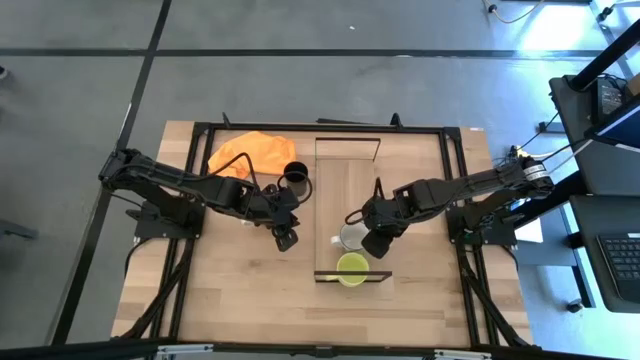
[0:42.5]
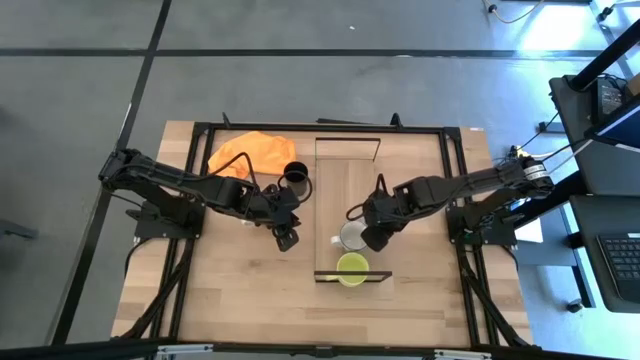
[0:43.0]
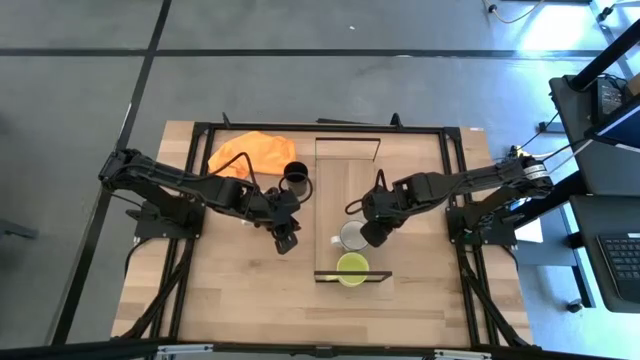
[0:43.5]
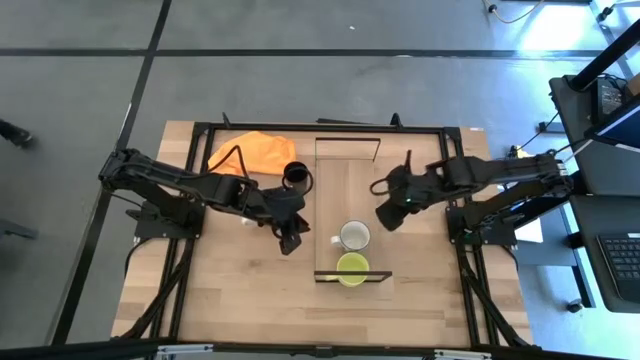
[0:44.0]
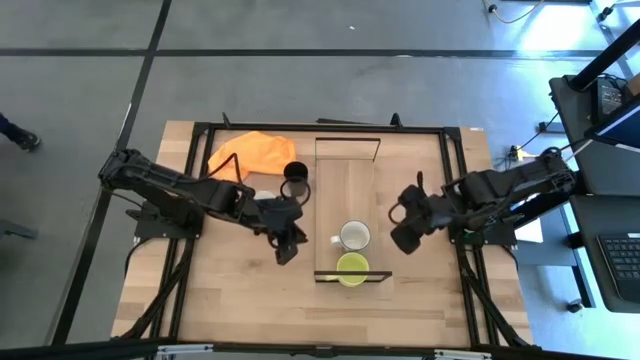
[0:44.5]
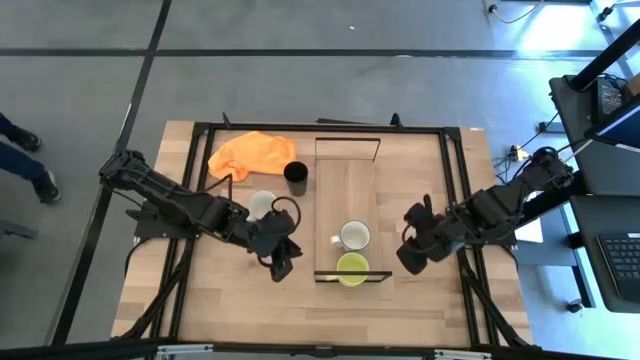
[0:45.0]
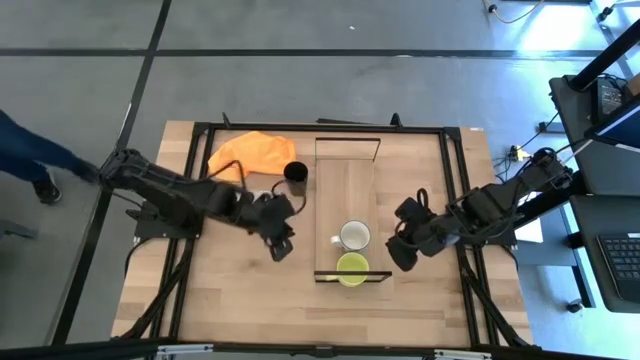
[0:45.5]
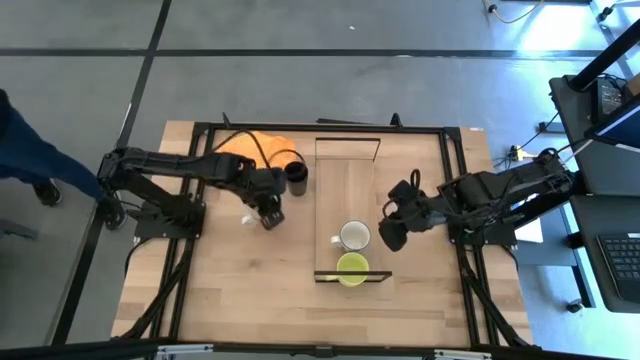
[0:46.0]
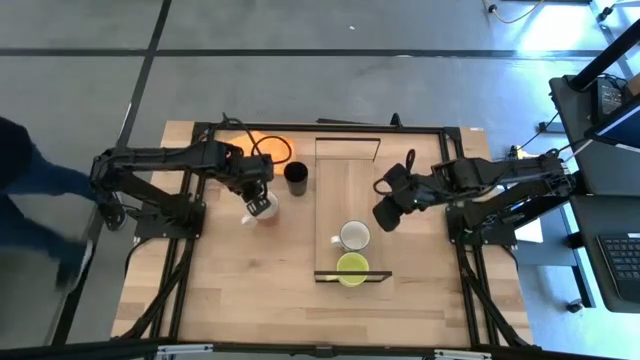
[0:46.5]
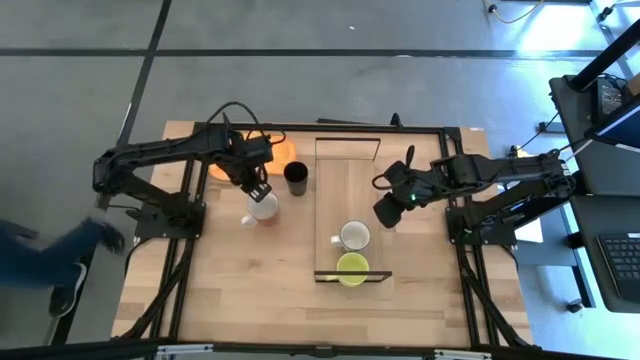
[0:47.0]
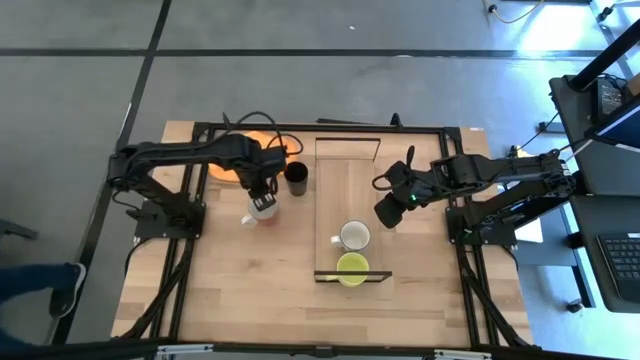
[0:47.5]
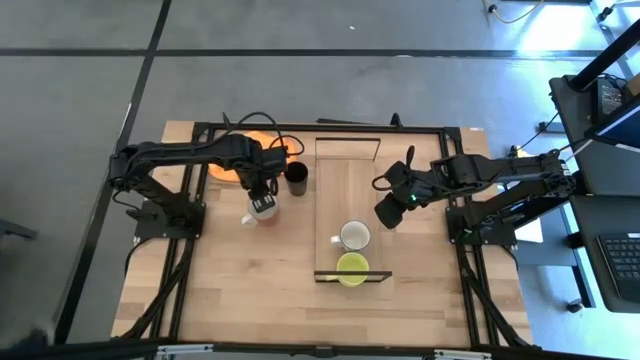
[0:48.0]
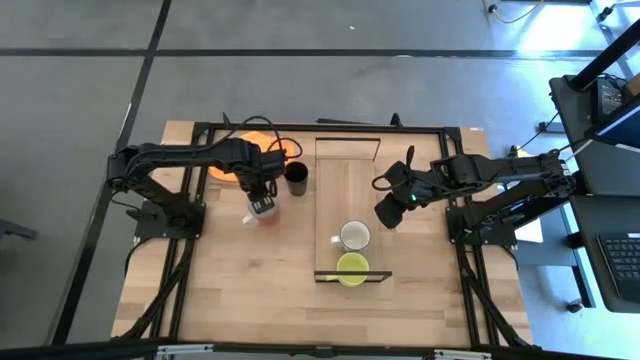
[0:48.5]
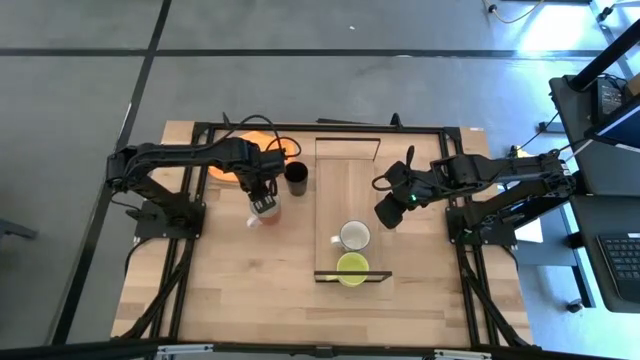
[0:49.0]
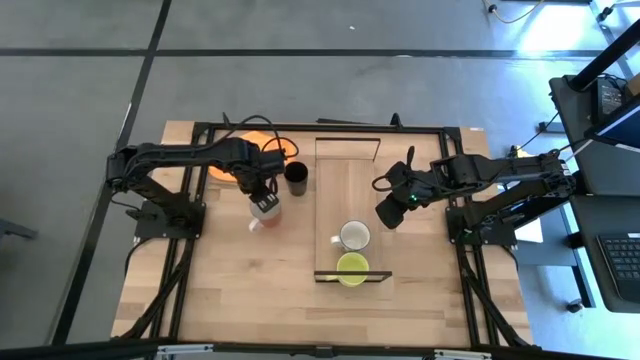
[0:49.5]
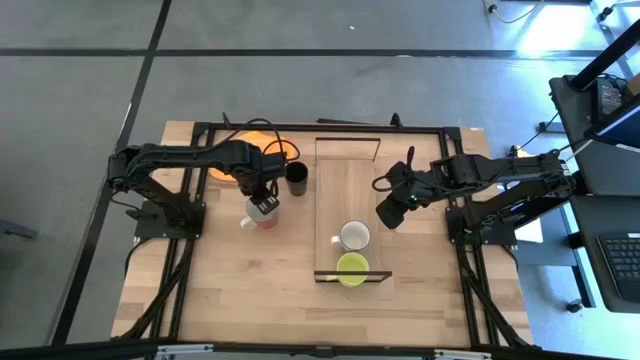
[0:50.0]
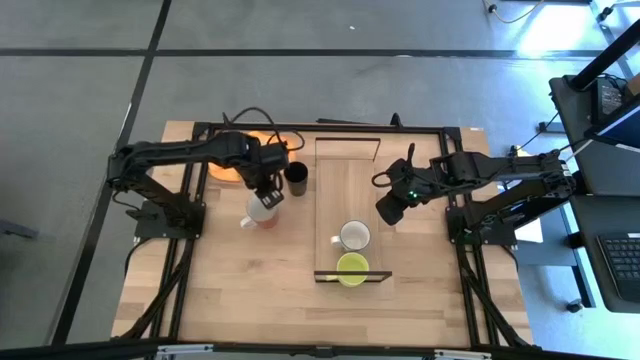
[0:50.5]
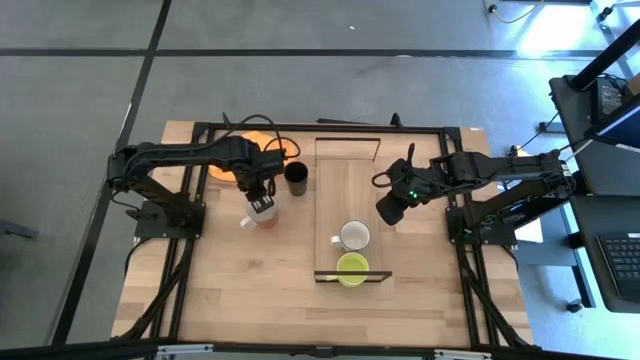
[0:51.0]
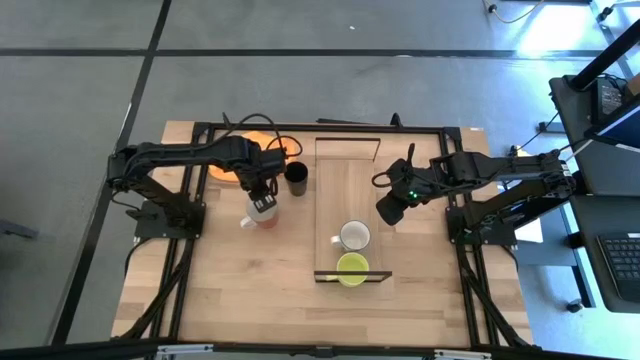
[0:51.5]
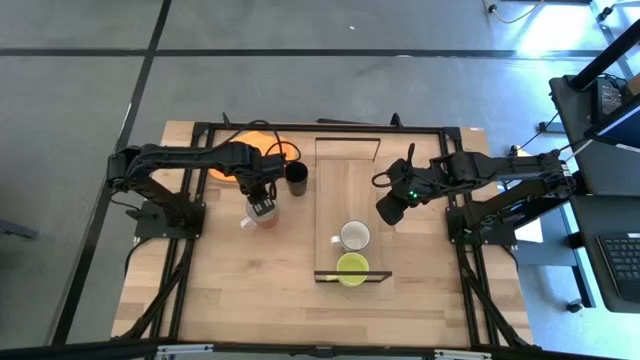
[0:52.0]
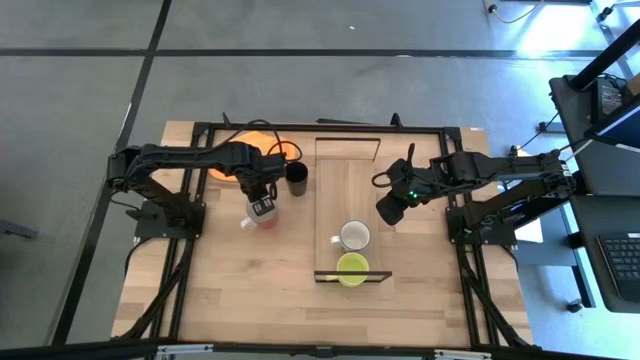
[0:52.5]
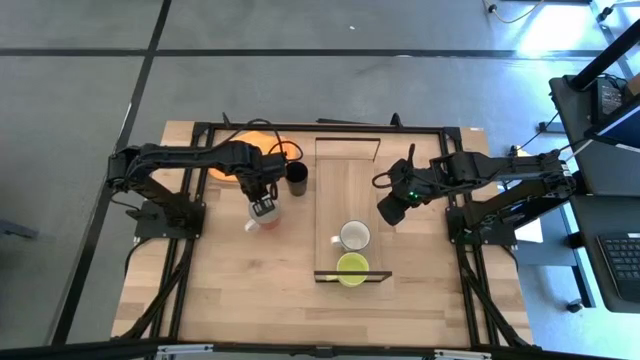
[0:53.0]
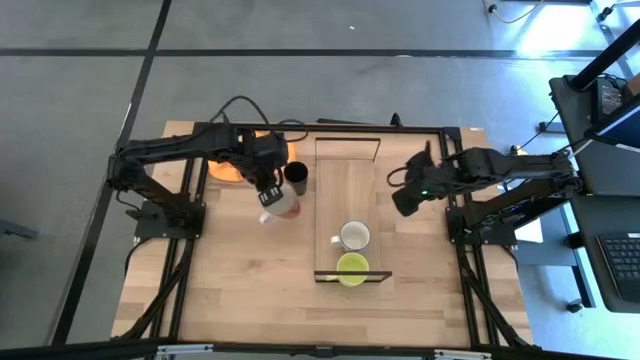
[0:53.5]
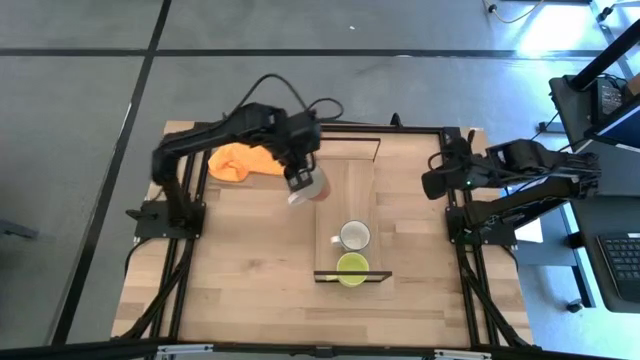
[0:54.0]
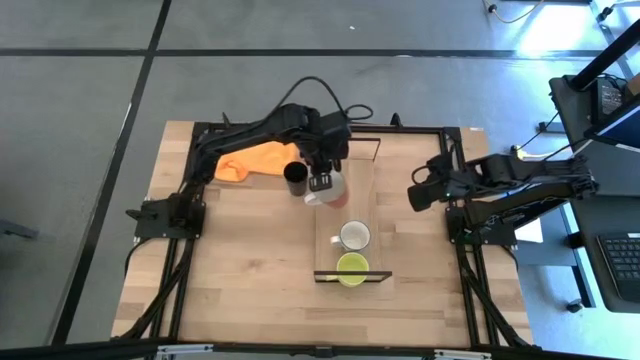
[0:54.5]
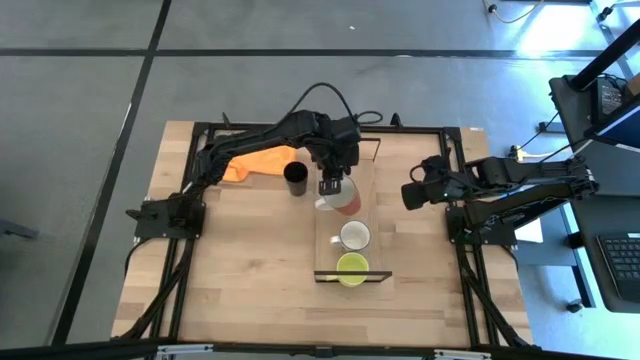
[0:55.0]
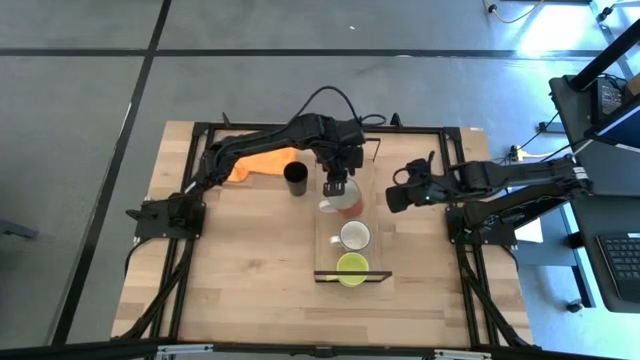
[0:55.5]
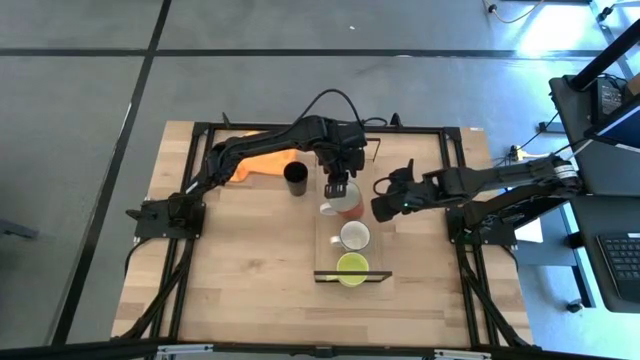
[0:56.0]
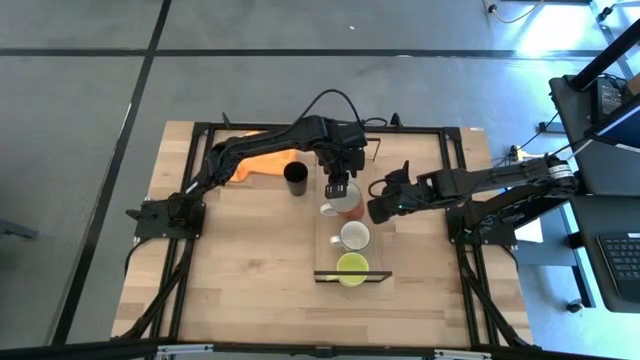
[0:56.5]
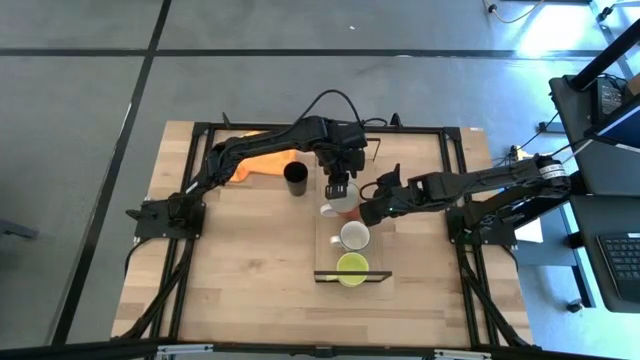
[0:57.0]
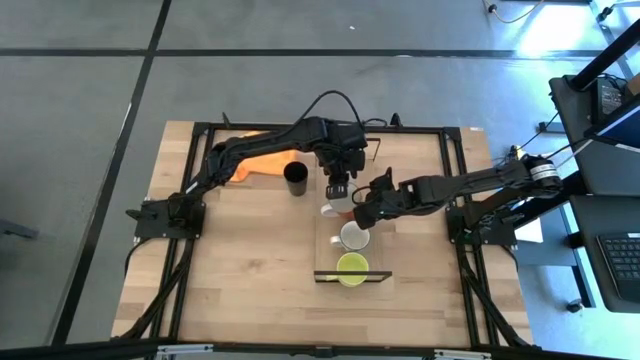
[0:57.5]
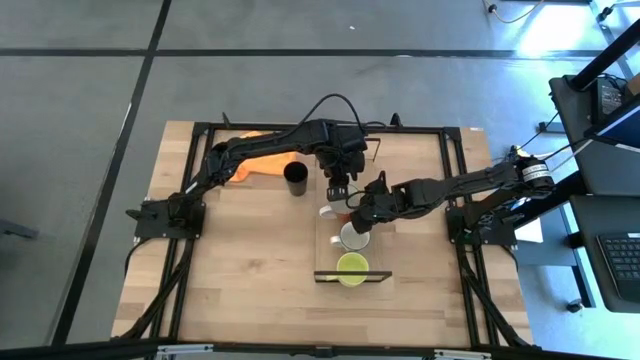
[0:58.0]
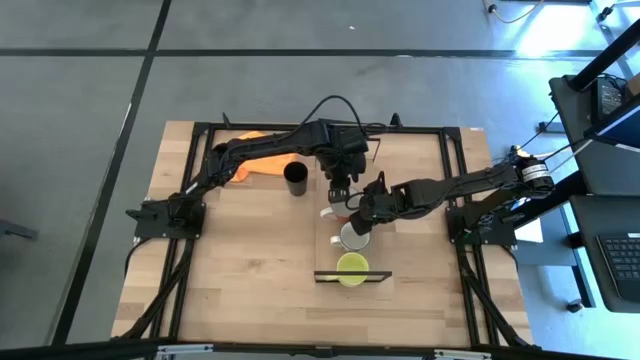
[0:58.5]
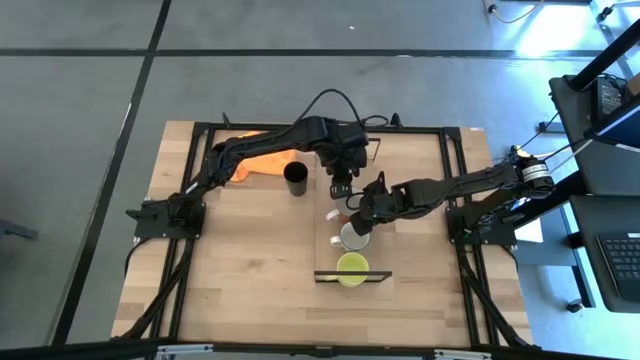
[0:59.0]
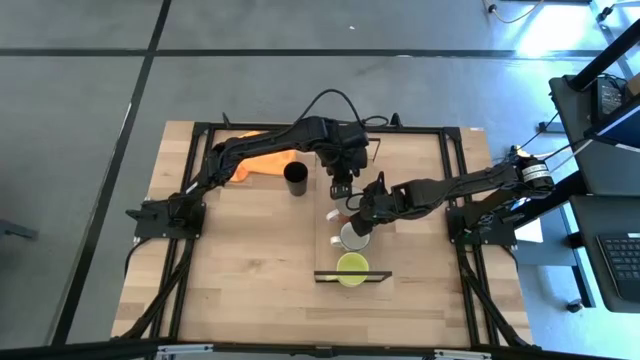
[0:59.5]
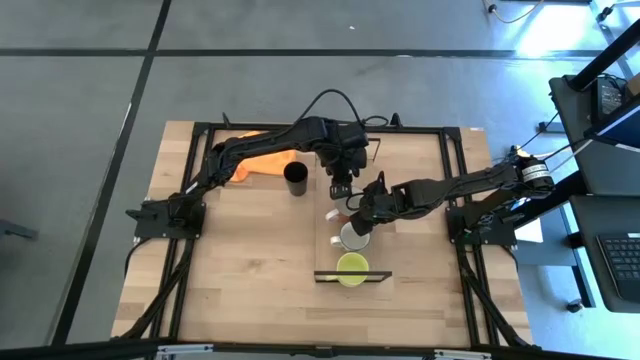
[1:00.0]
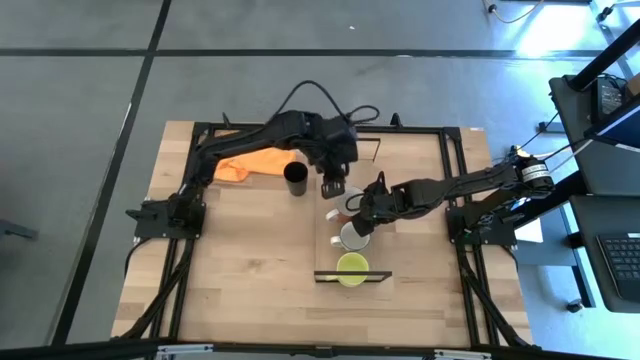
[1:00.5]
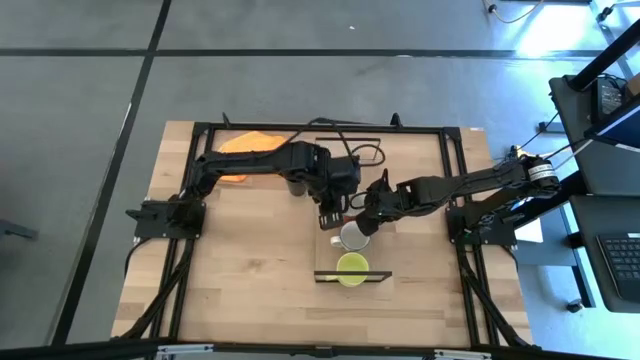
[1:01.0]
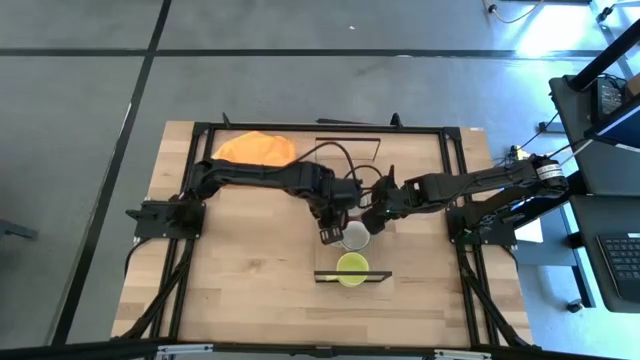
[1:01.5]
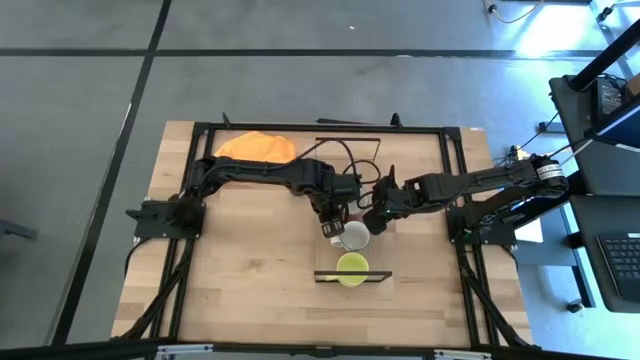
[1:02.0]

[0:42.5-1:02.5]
Task: Stack small to large cups/mugs on shelf
Put the white and red mug on the shelf
